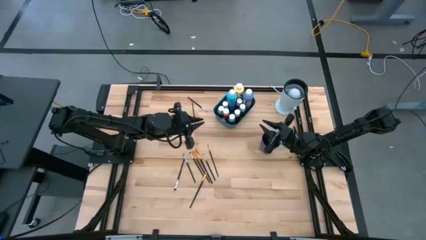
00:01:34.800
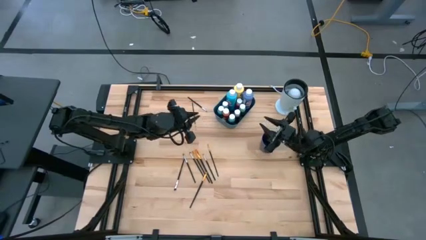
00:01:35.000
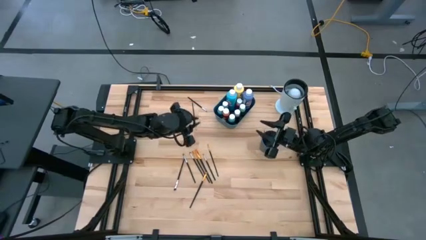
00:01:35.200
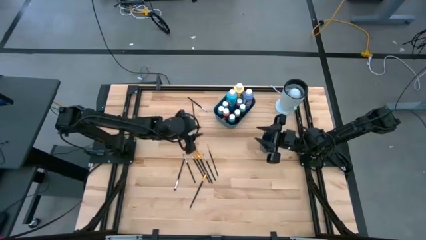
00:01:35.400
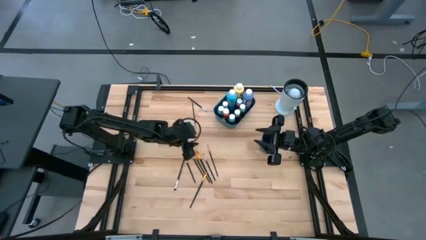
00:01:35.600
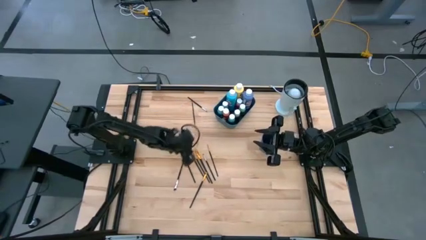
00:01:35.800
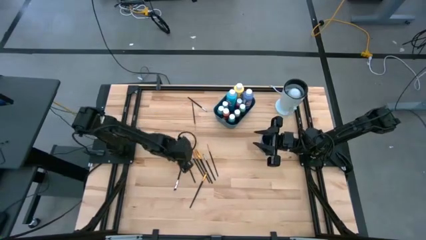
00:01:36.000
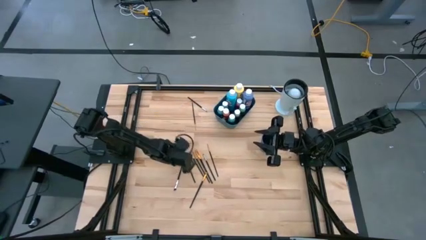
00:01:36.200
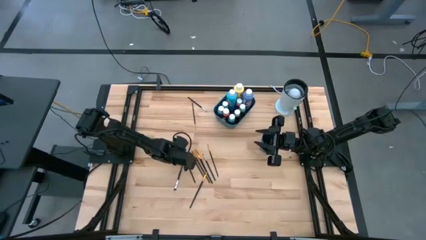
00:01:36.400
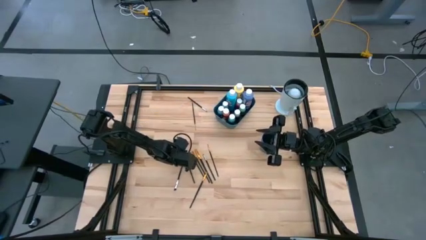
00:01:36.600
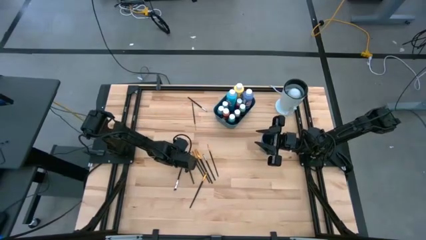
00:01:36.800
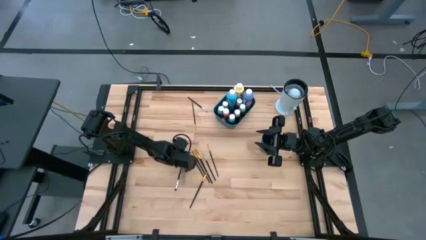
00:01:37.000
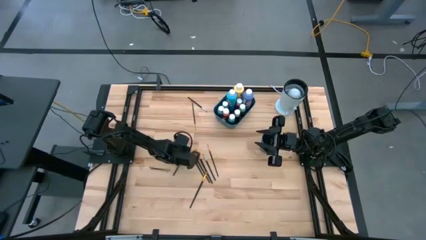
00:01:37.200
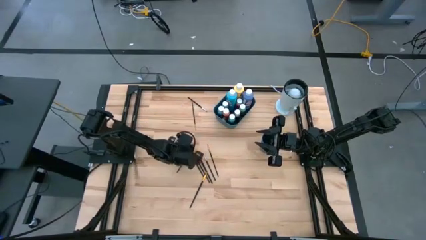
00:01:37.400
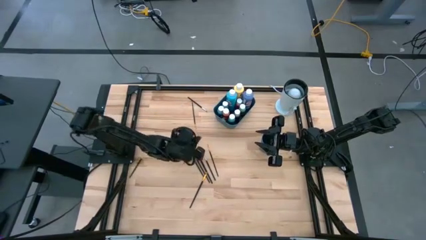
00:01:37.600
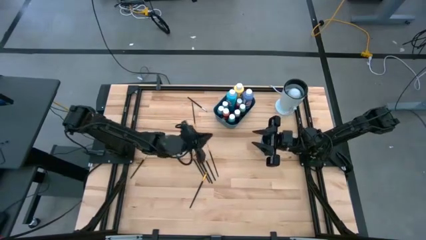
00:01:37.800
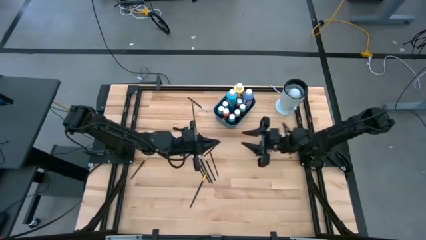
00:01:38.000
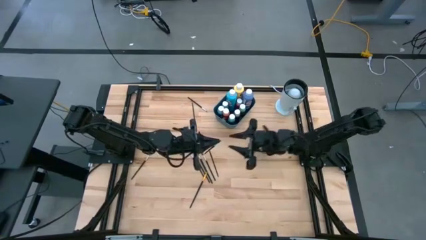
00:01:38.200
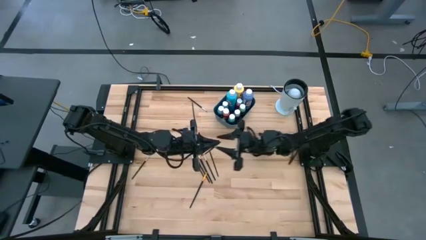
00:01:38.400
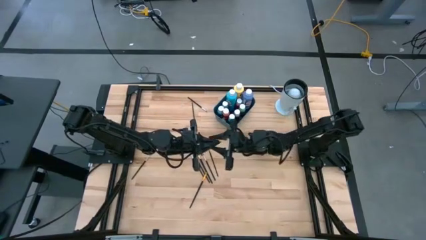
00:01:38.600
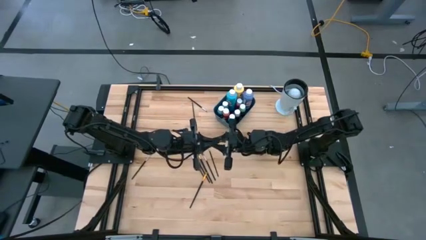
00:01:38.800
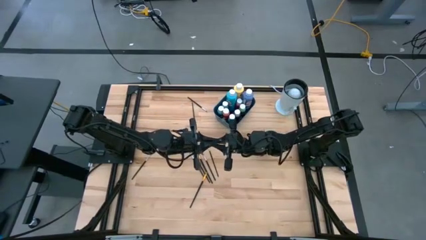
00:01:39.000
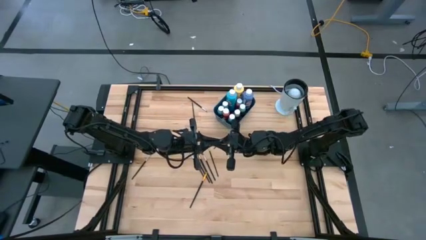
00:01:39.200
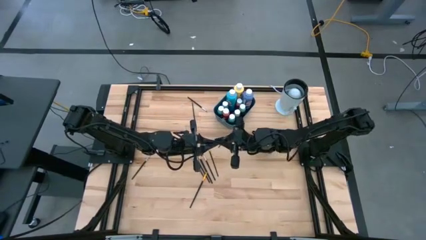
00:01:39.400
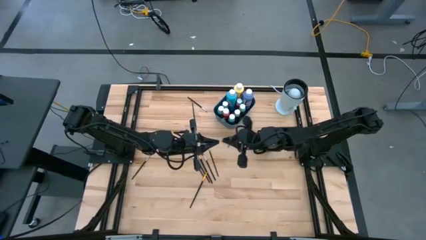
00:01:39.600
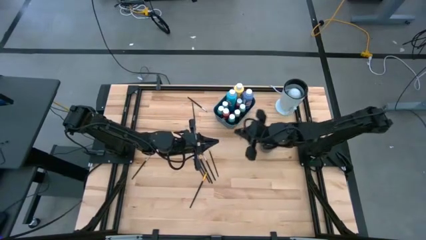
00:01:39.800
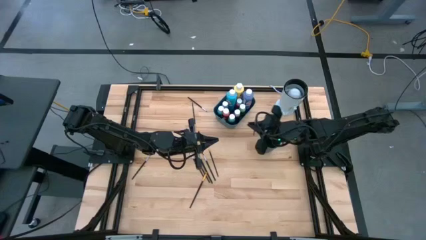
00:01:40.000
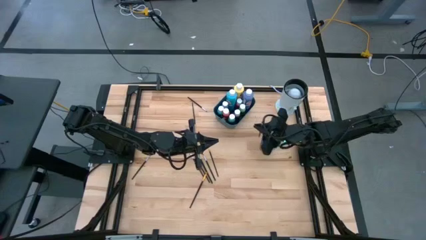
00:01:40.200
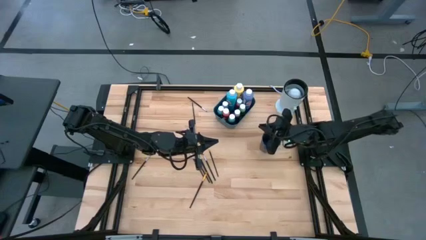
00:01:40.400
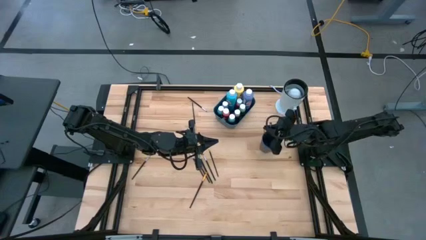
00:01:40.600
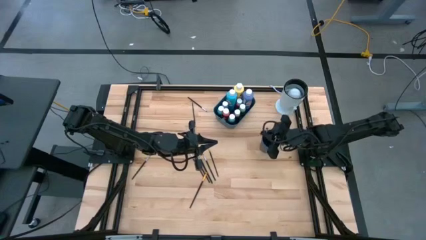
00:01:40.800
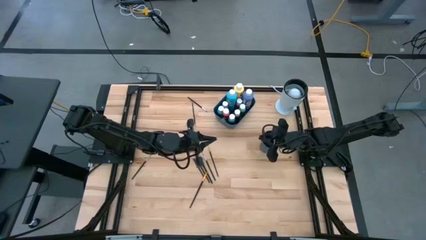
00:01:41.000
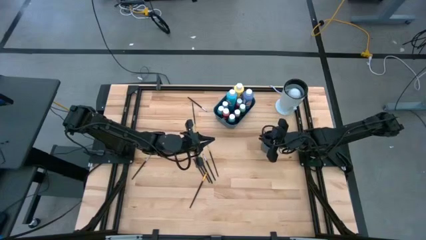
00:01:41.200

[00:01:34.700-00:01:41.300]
Task: Pick & Place Paint Supplies
Put the black paint brush into the blue cup

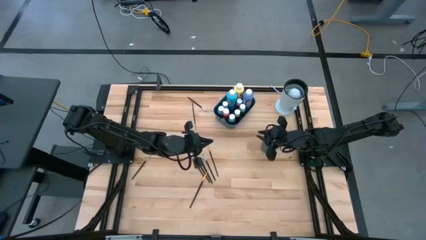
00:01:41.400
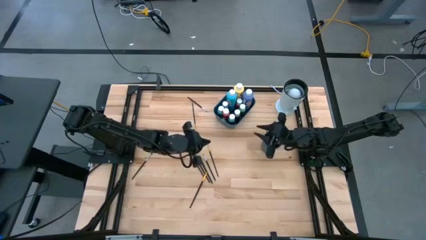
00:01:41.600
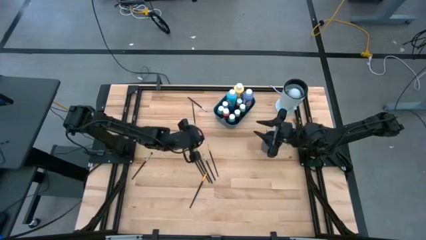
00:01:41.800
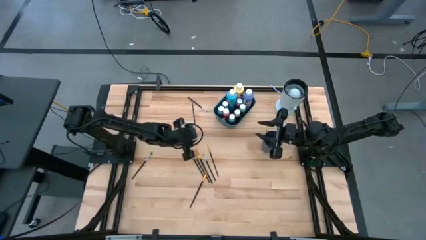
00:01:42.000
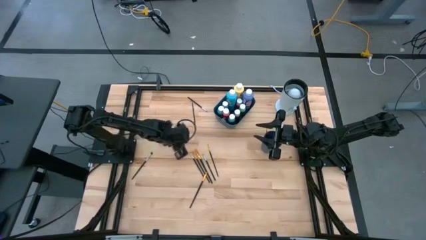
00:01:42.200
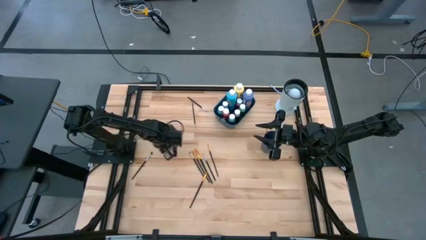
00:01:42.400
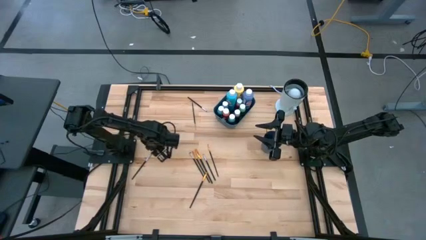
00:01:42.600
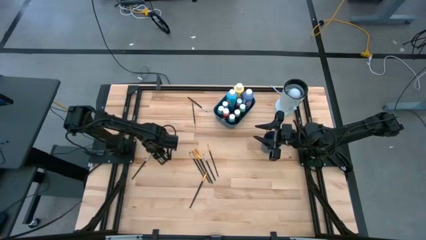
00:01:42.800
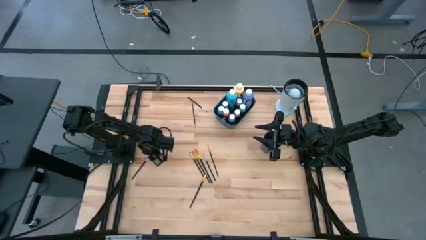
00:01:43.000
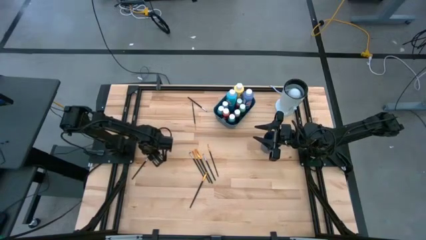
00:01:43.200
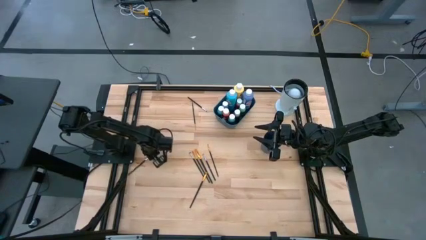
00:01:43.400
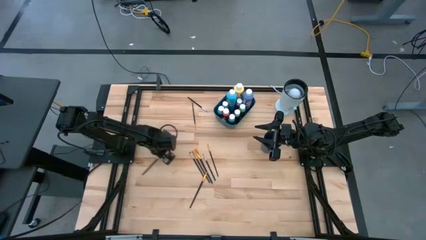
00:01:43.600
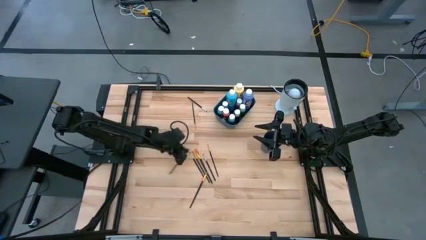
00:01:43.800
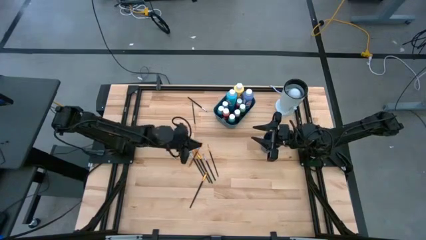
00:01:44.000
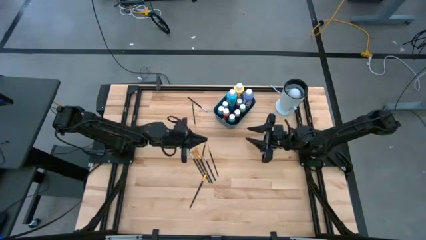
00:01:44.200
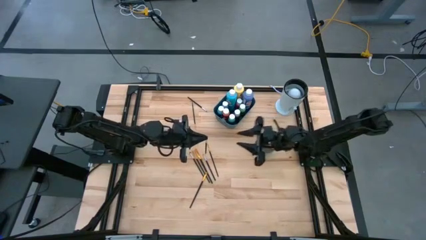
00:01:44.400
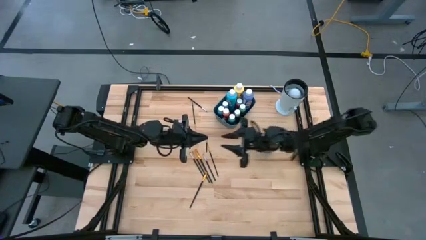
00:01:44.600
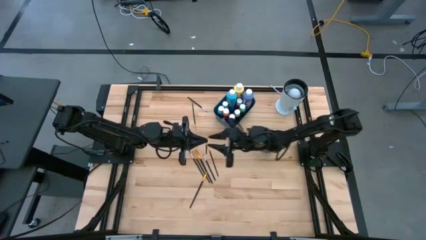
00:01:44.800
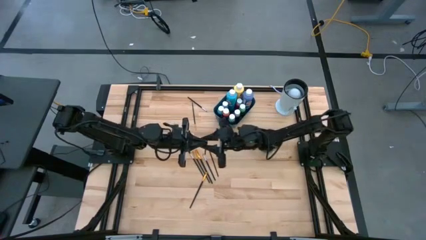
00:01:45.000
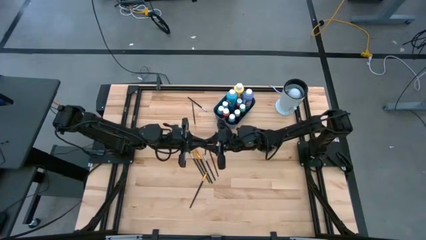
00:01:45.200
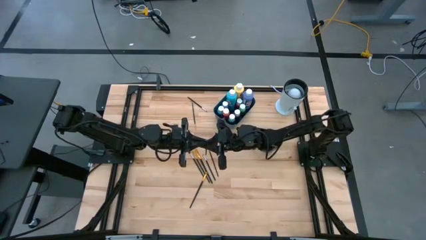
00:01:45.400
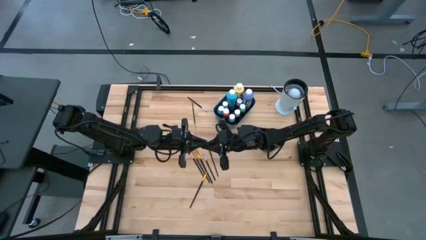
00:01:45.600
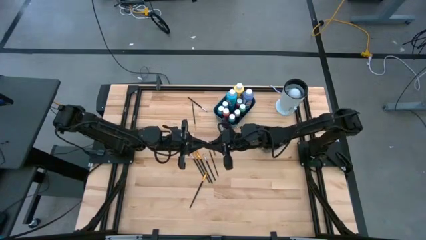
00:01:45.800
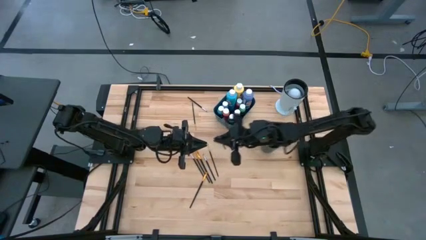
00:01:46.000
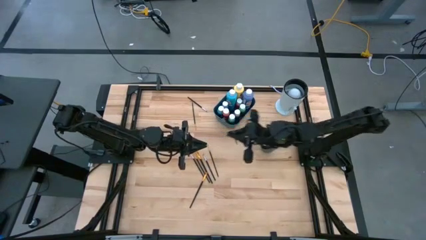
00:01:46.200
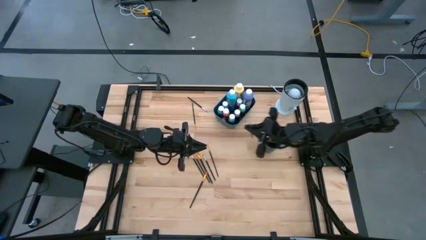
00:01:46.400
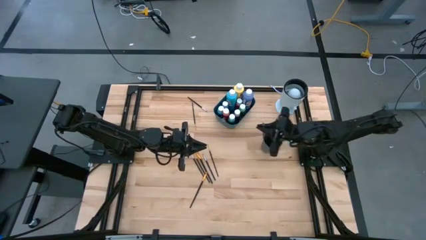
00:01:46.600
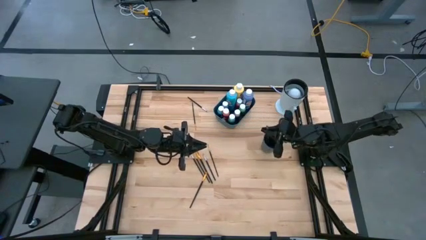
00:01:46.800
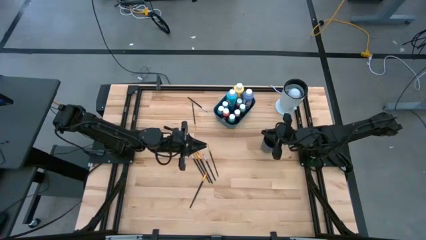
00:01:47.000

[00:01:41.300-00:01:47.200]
Put the black paint brush into the blue cup

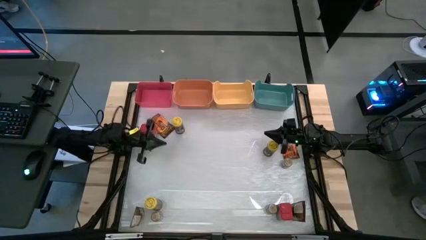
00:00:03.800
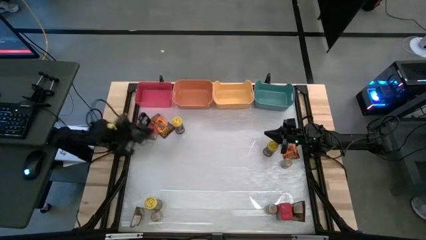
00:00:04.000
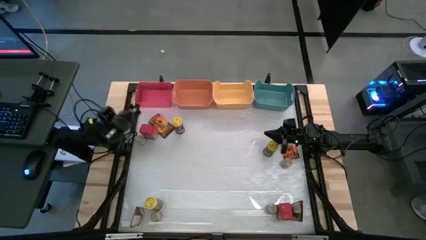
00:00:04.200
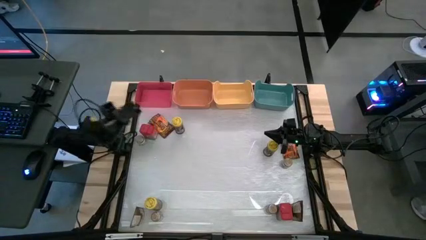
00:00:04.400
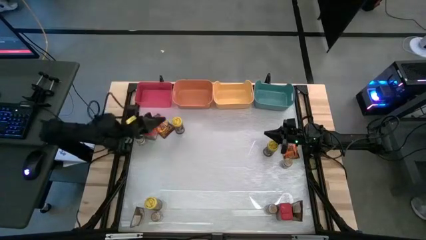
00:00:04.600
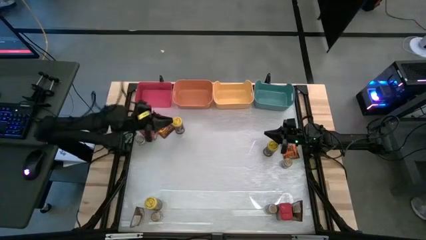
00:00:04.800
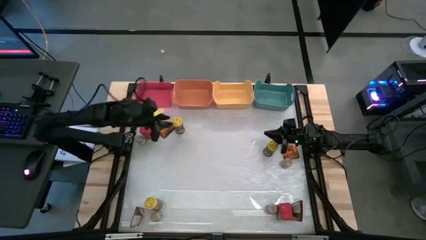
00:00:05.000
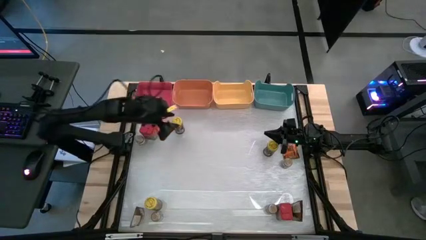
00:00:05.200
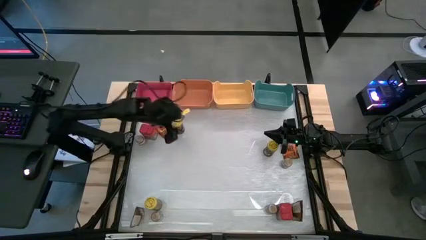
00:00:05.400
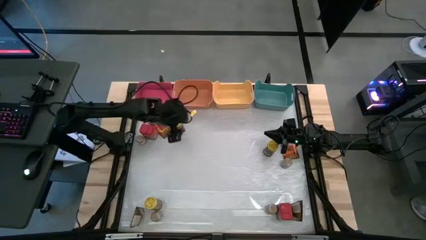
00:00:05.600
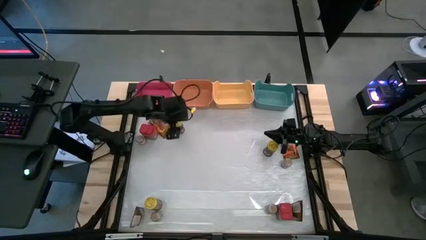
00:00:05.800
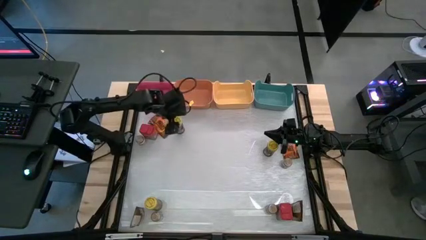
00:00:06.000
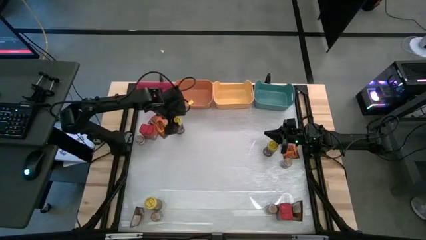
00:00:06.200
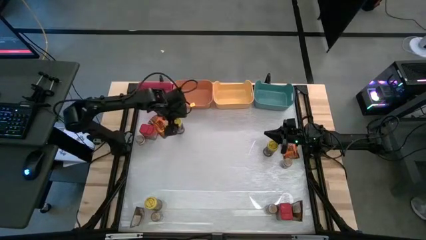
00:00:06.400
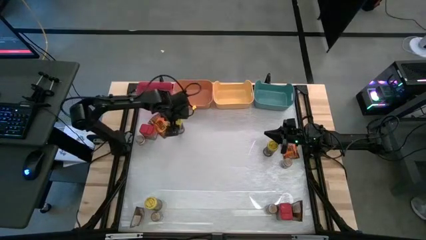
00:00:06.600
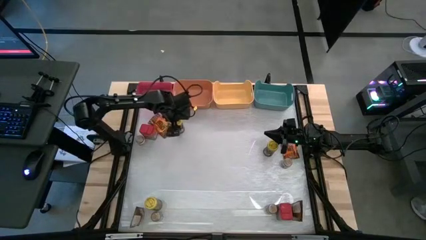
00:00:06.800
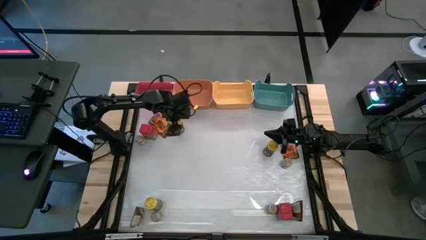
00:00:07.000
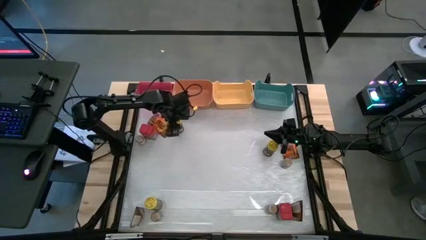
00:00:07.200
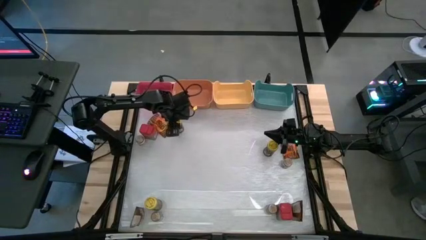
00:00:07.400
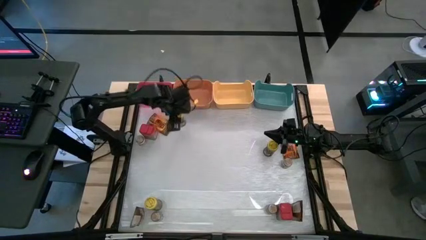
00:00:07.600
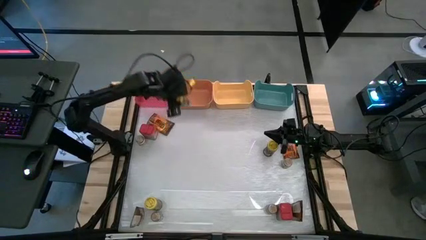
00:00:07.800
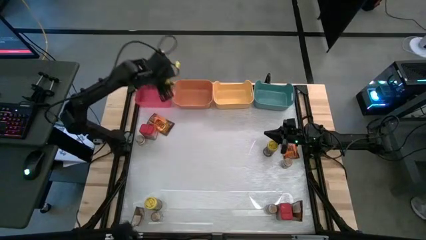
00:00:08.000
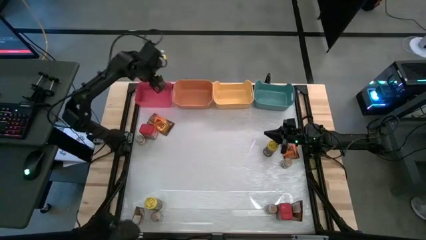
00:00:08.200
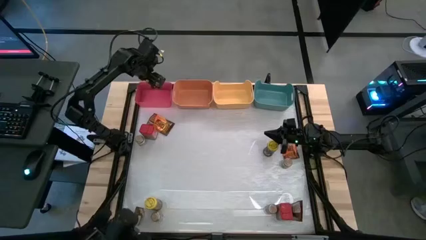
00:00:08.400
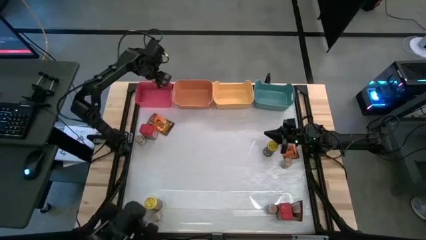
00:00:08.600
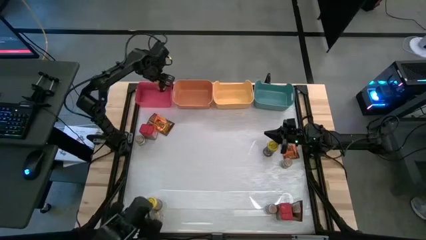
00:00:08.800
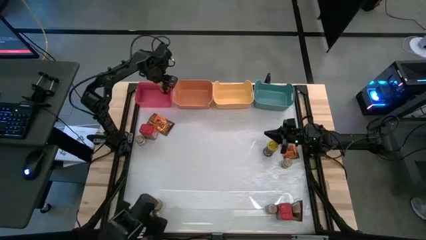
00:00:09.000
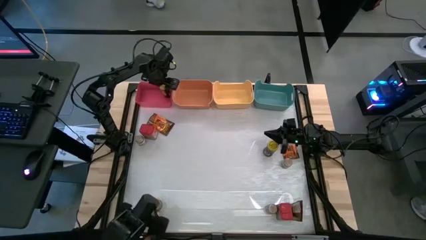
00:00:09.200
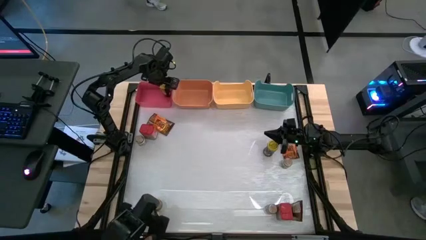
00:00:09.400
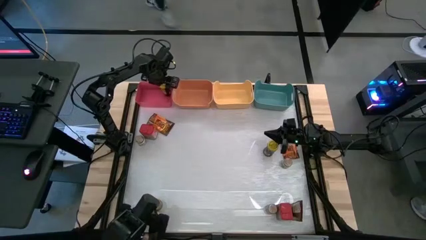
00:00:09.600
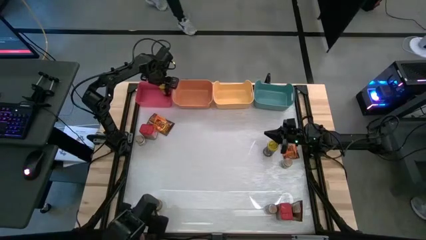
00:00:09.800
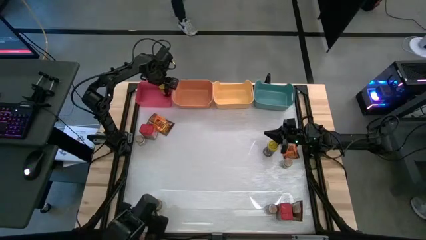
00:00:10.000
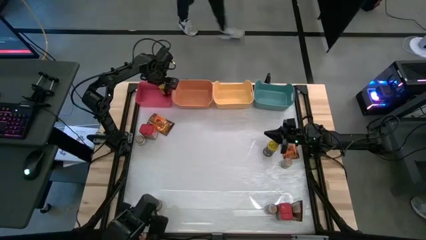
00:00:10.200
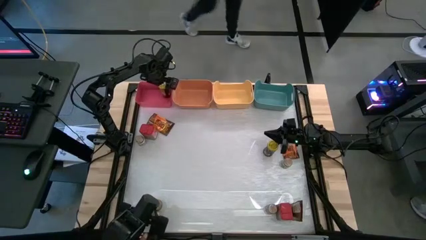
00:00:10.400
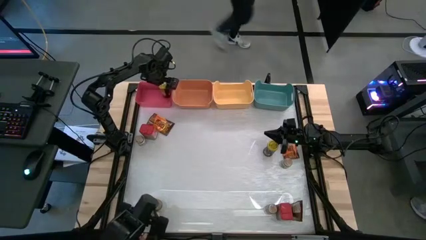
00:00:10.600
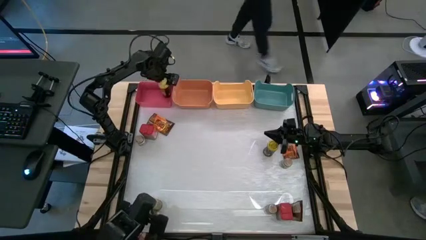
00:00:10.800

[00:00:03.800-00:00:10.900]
Task: Sort spices by type
Put the left yellow seasoning can into the pink bin
